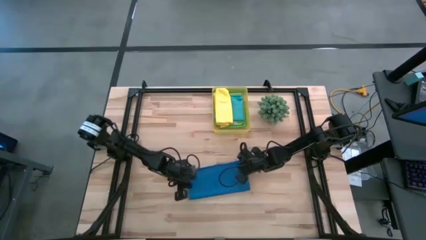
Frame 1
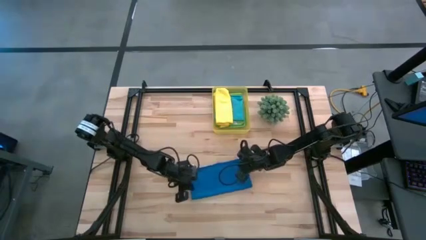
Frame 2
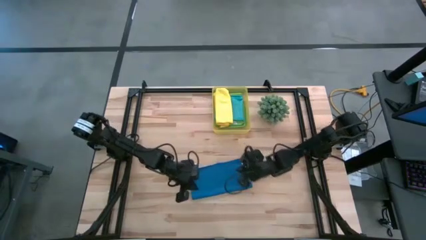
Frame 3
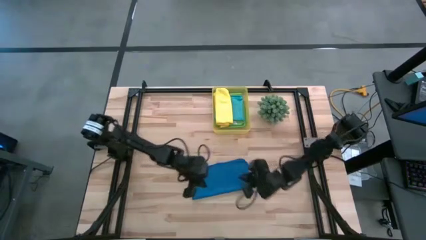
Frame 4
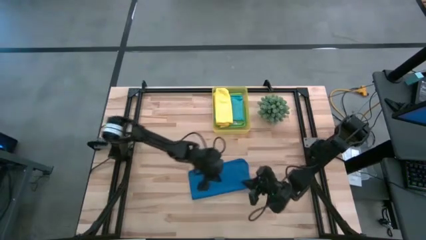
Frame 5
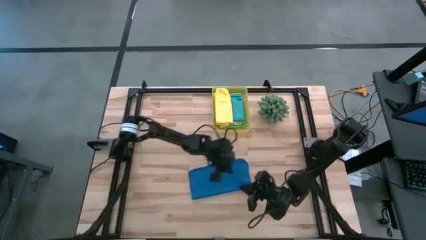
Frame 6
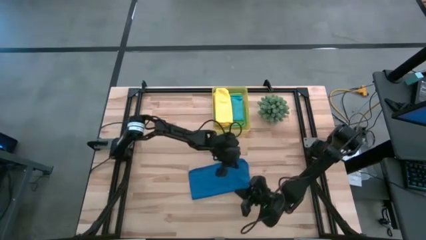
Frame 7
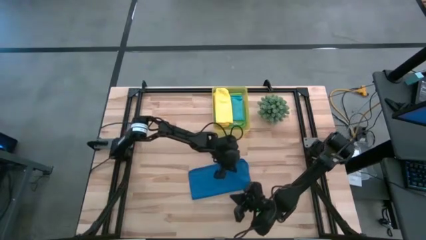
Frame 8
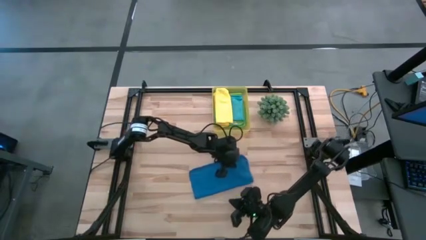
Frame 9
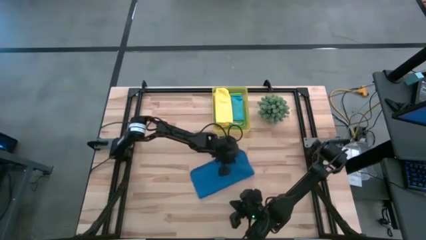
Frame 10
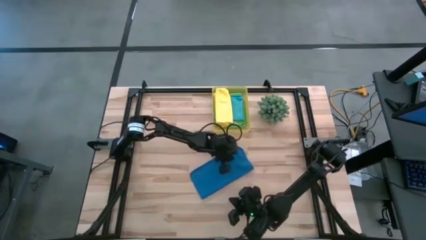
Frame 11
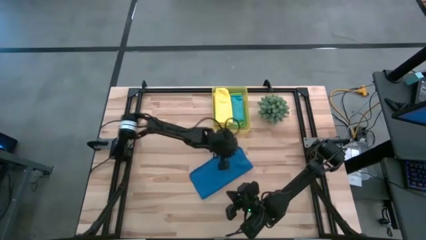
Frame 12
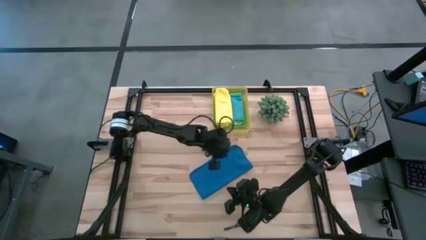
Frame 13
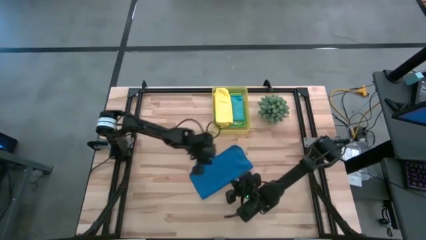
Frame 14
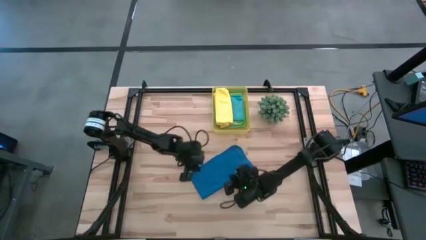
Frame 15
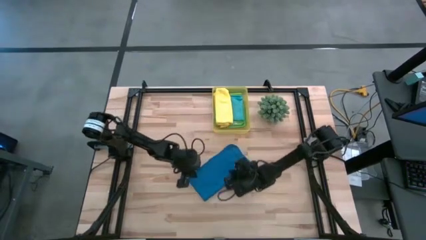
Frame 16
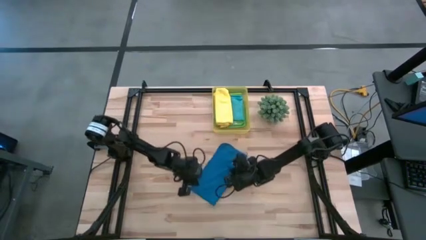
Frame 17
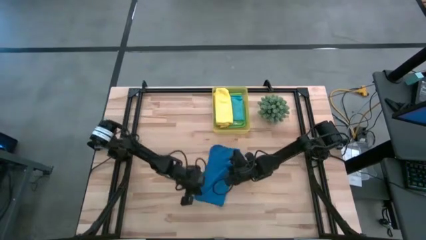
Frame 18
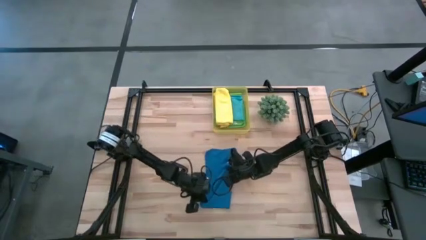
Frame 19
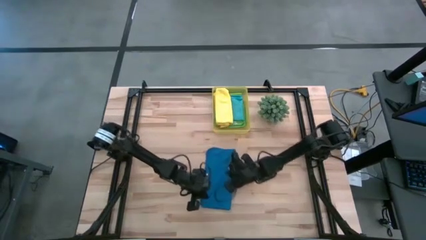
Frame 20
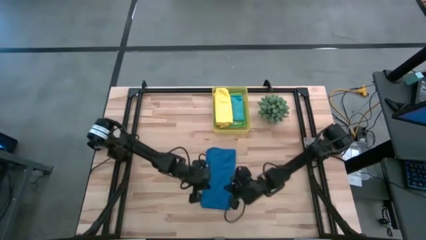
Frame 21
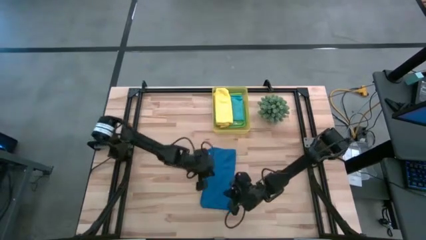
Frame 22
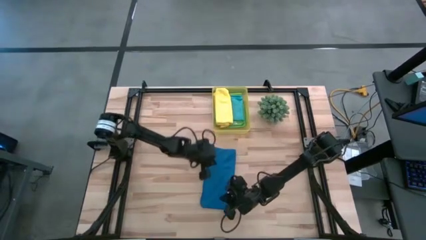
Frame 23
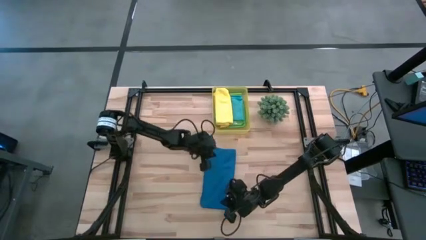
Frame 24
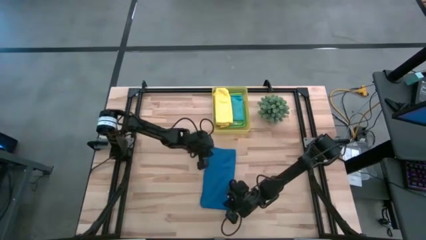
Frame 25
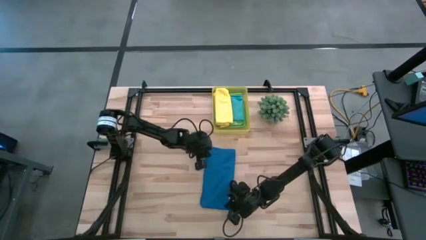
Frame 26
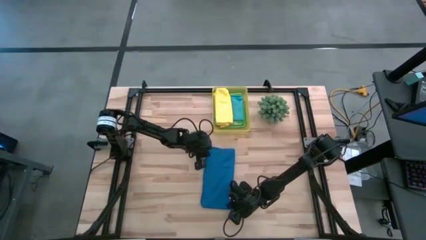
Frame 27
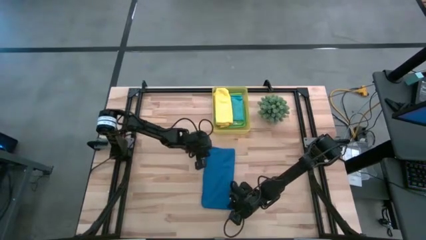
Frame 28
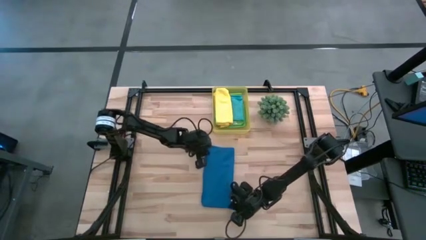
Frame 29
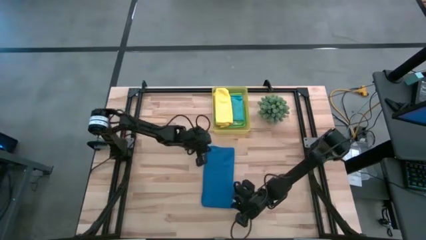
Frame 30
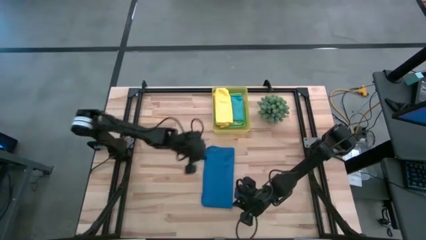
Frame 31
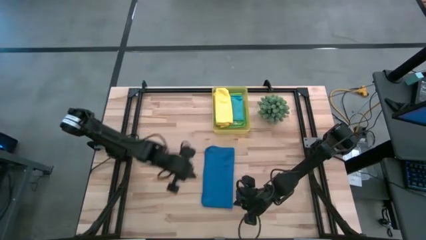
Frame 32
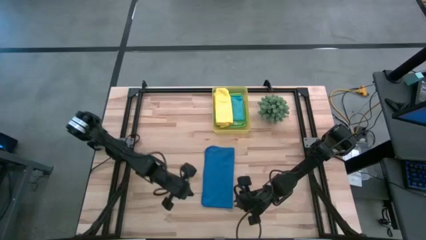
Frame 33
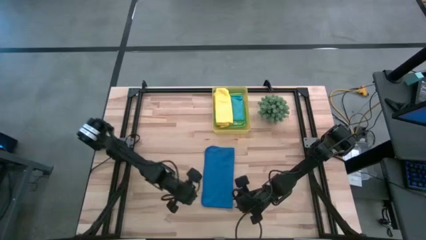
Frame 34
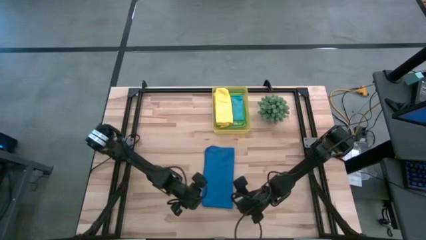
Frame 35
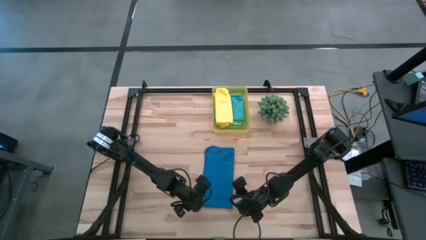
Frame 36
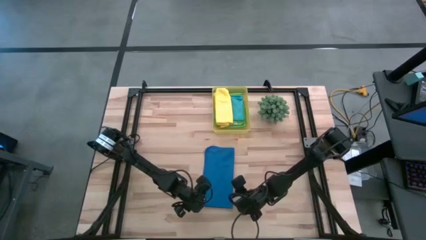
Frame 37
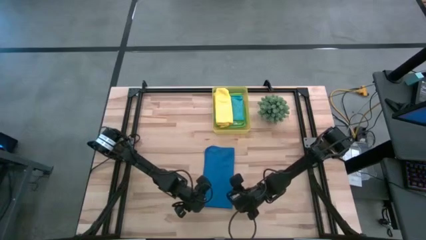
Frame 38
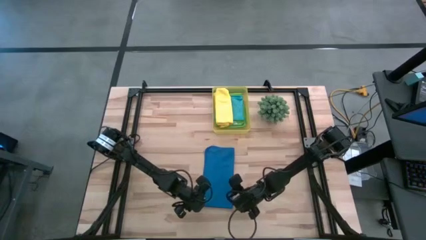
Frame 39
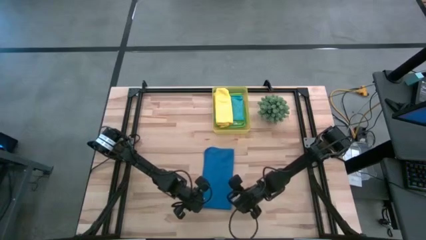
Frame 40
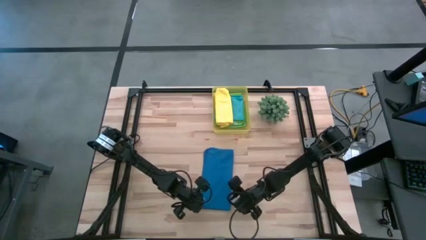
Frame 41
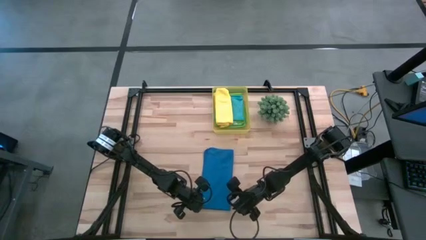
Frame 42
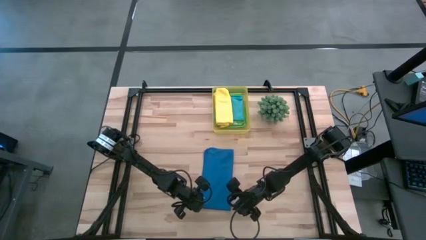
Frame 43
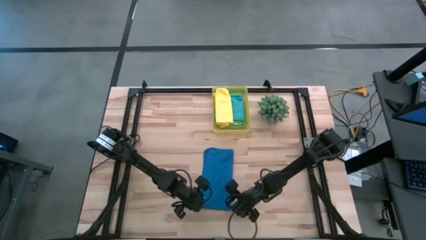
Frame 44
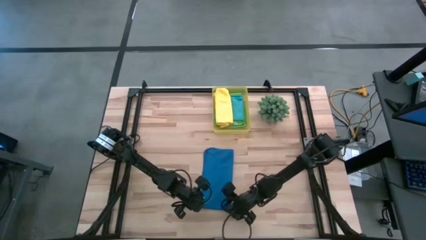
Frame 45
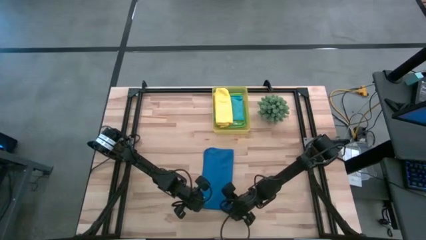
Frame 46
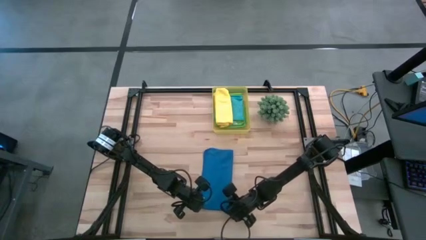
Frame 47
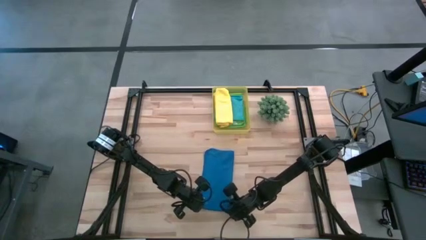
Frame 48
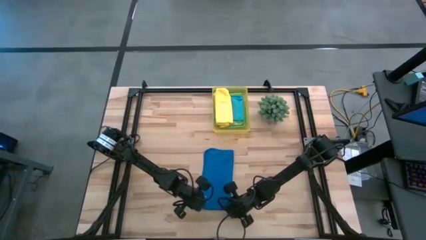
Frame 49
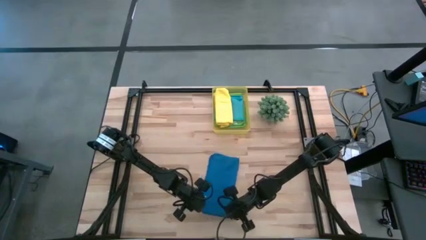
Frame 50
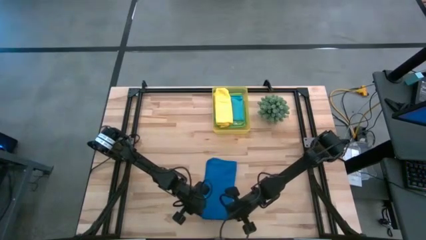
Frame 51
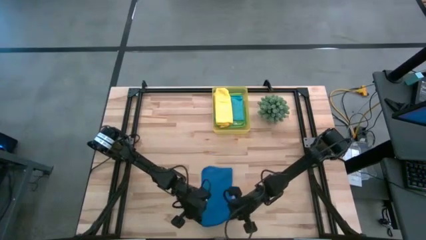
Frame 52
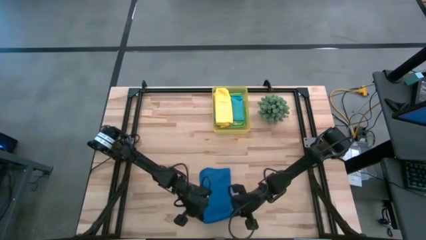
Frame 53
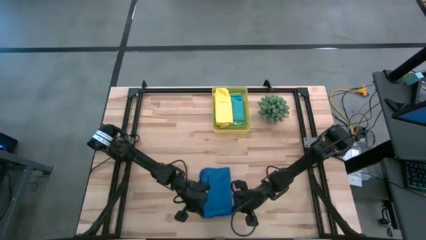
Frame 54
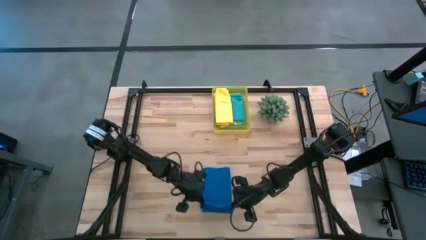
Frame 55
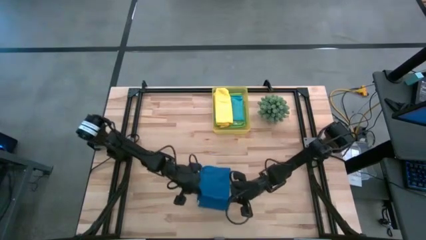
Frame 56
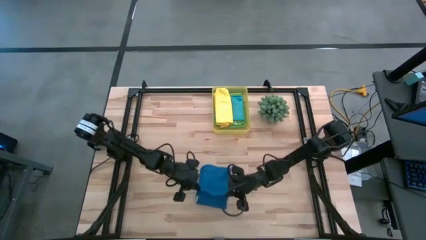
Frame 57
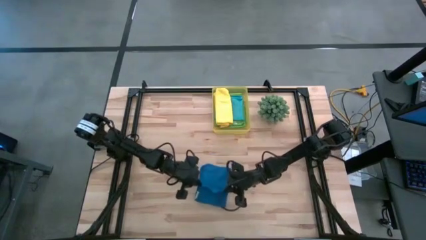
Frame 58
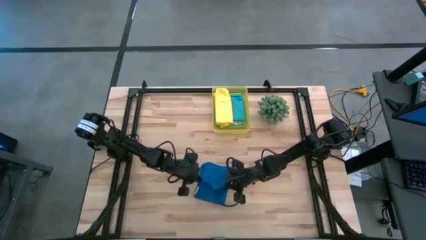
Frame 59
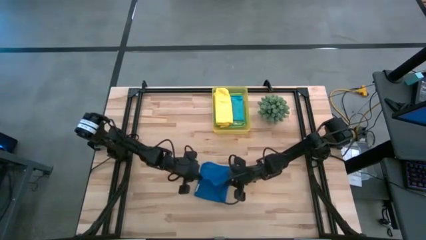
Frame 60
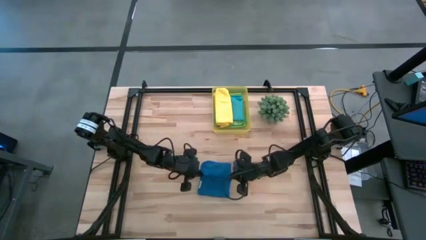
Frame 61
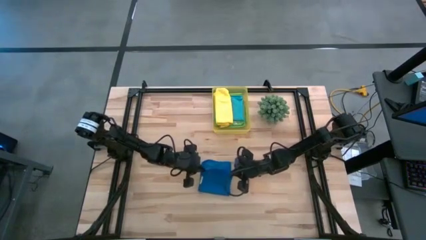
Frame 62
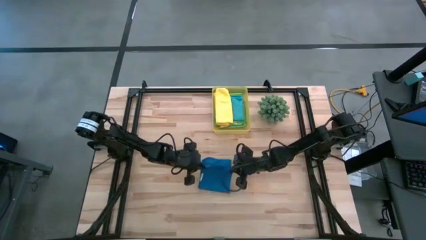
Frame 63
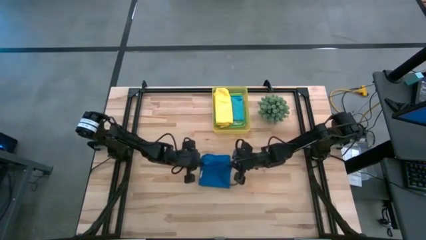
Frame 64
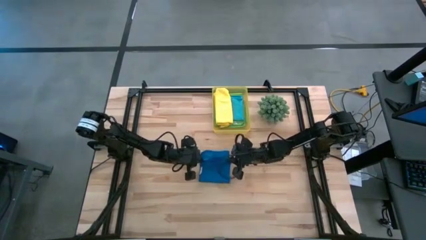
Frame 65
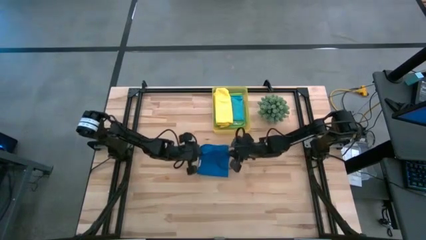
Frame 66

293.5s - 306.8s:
Task: Fold microfiber towels
Fold the blue microfiber cloth

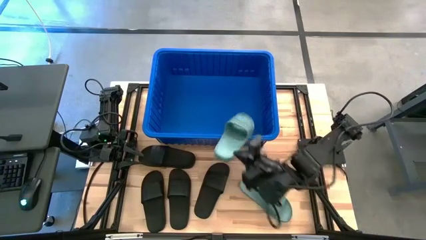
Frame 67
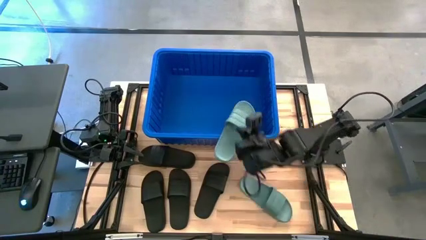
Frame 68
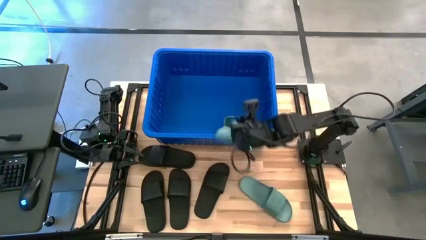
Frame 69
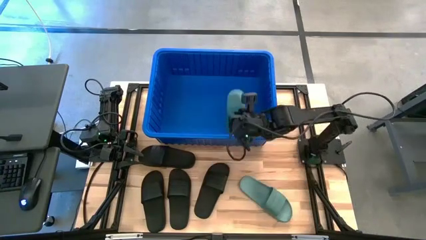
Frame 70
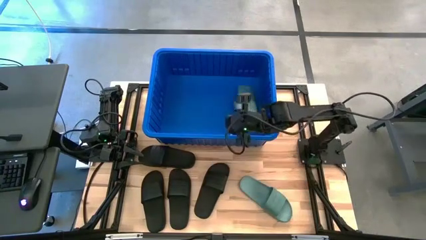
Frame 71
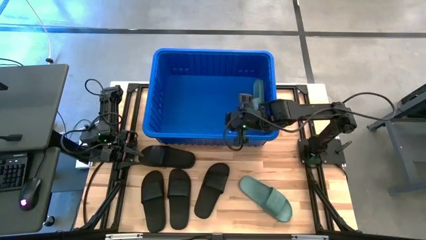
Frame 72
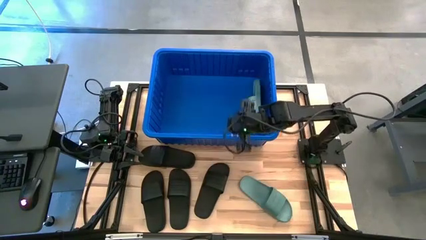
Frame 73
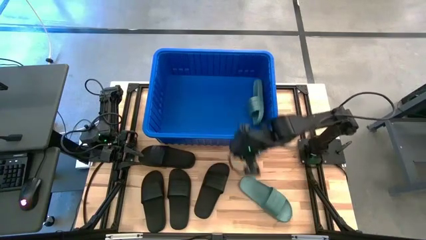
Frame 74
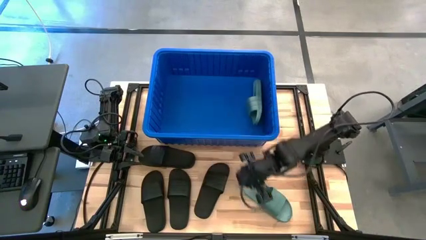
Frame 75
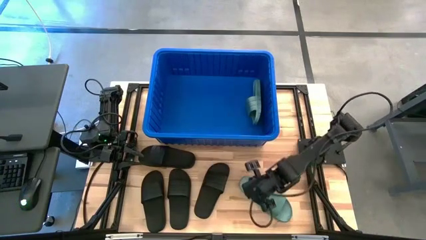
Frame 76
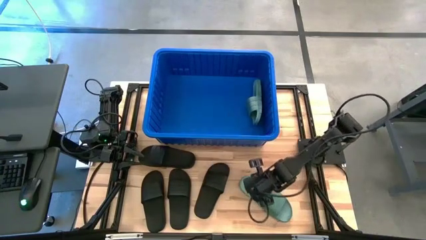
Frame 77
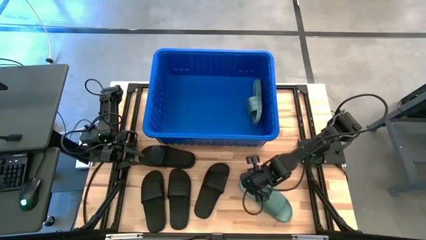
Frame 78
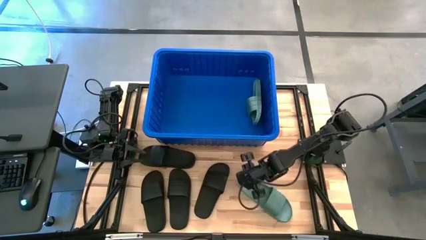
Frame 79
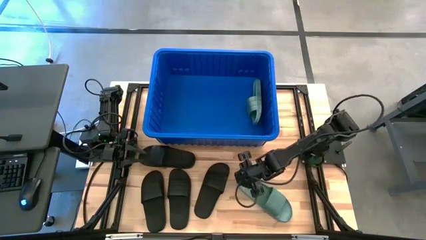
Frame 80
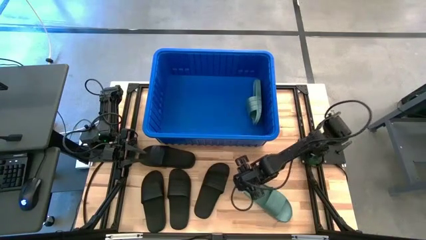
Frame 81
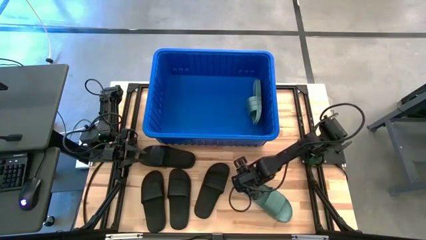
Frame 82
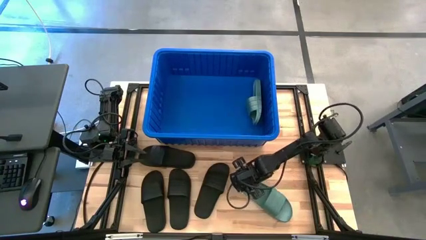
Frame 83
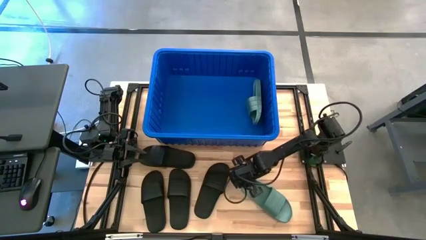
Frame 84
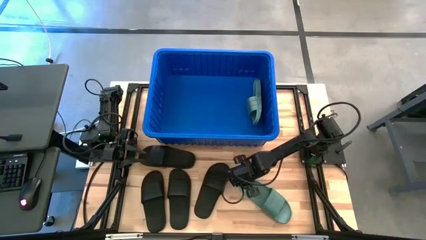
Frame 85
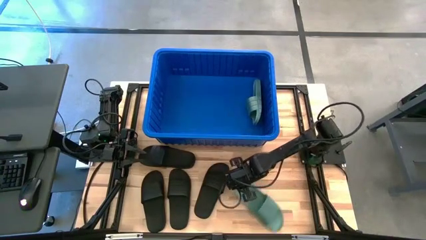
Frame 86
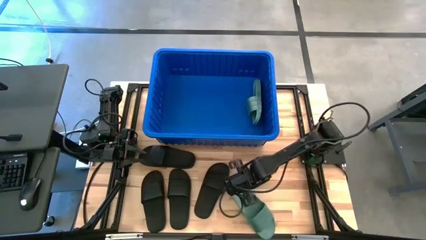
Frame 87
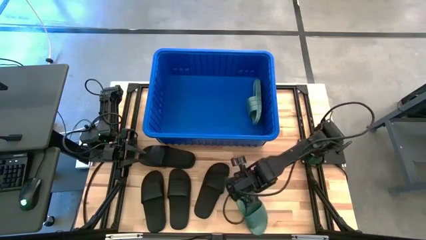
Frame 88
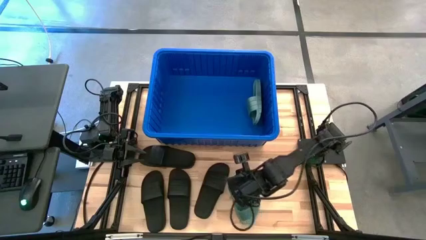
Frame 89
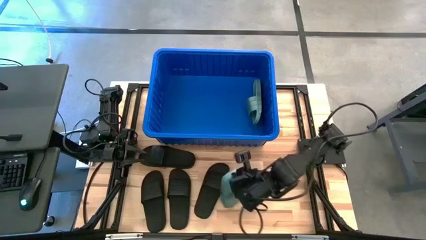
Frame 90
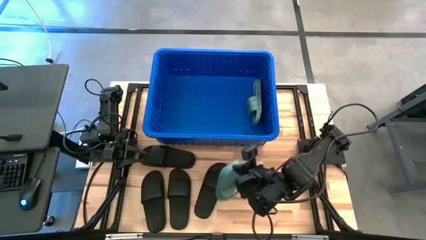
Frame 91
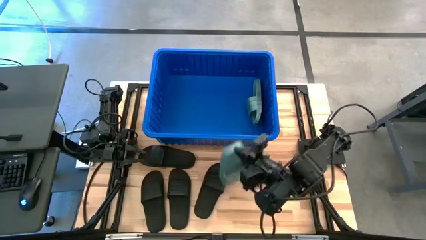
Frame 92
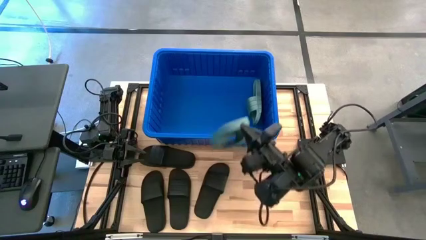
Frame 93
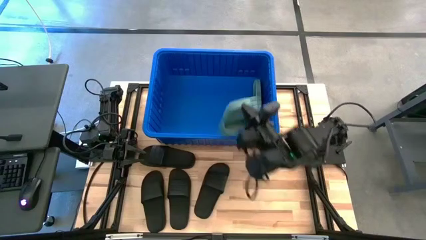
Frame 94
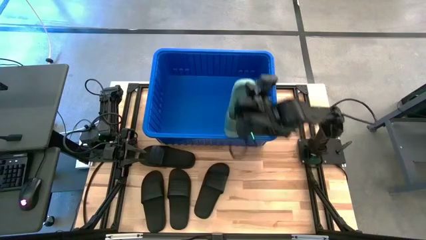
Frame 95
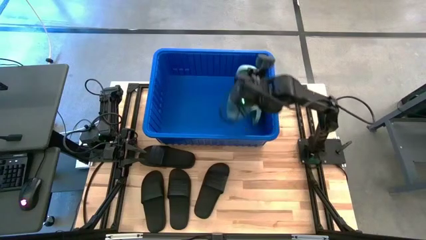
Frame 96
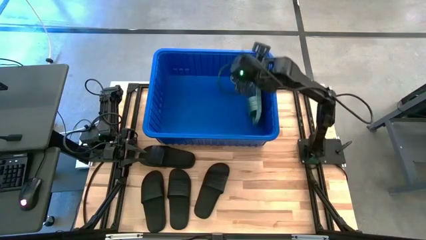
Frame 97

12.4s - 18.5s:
Task: Pick and place slides into bin
Put the green slide into the blue bin
